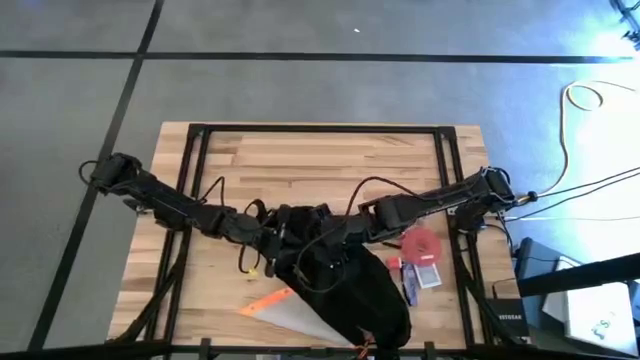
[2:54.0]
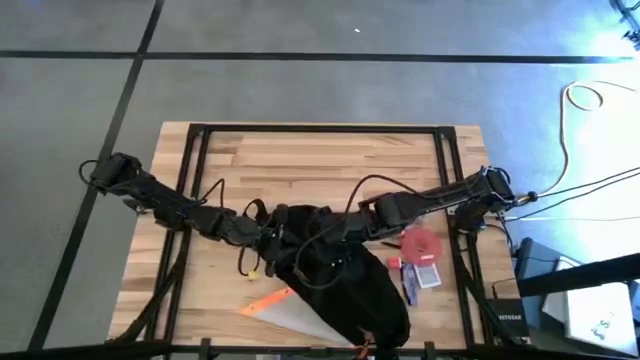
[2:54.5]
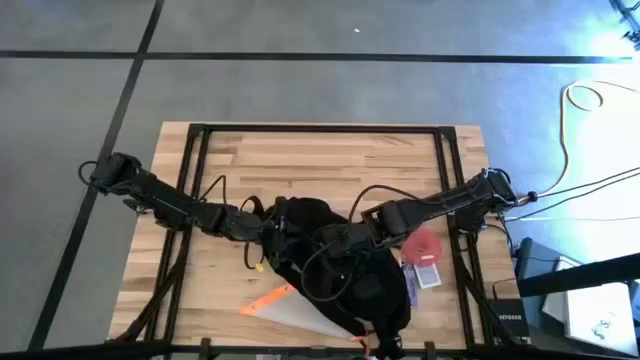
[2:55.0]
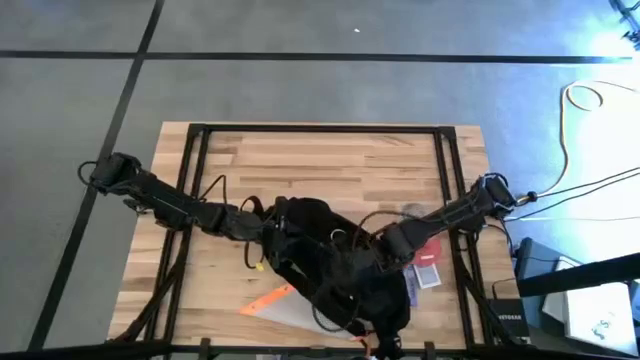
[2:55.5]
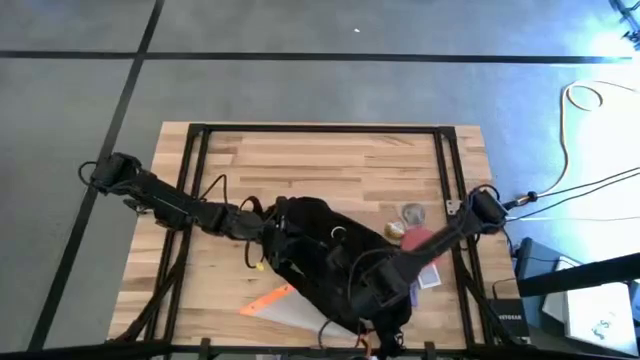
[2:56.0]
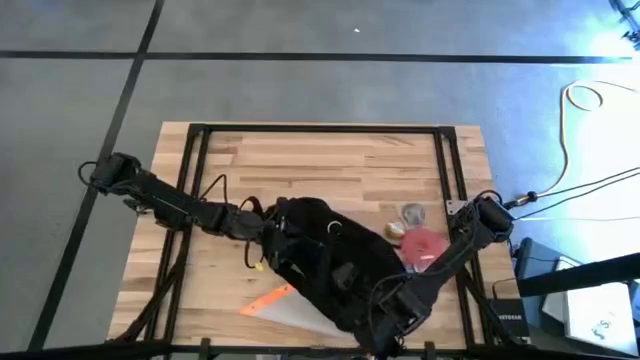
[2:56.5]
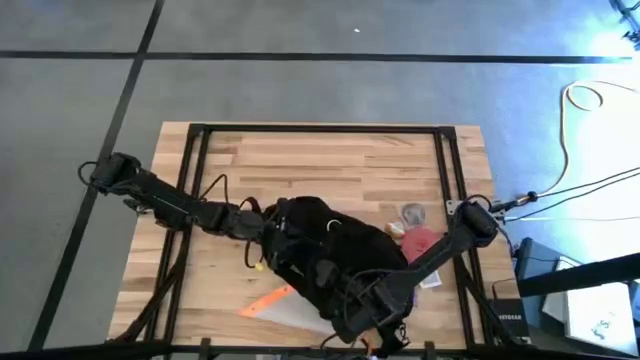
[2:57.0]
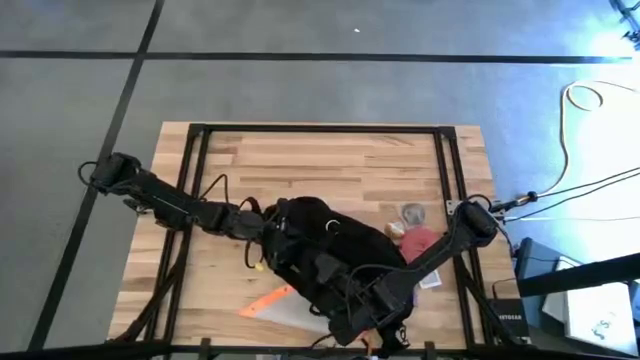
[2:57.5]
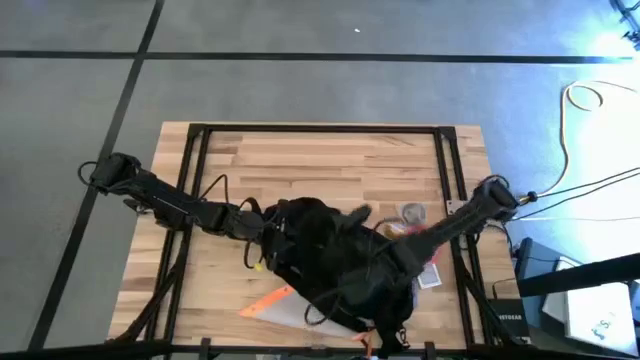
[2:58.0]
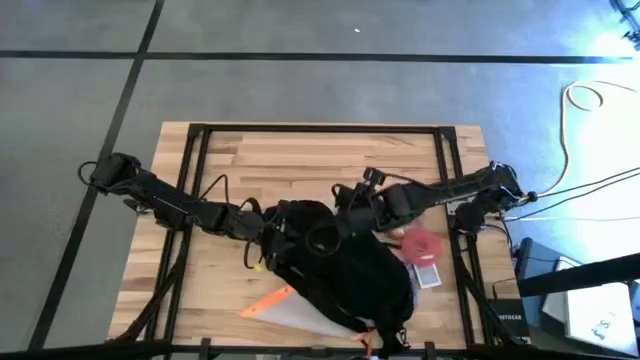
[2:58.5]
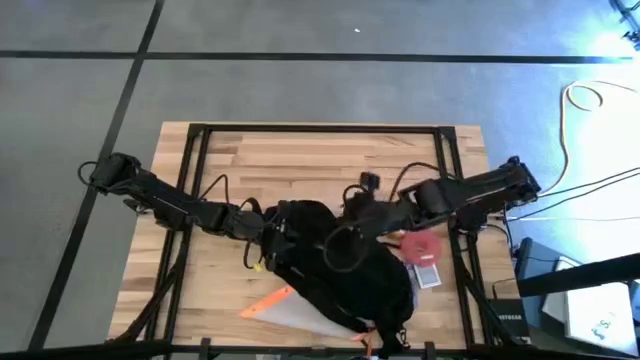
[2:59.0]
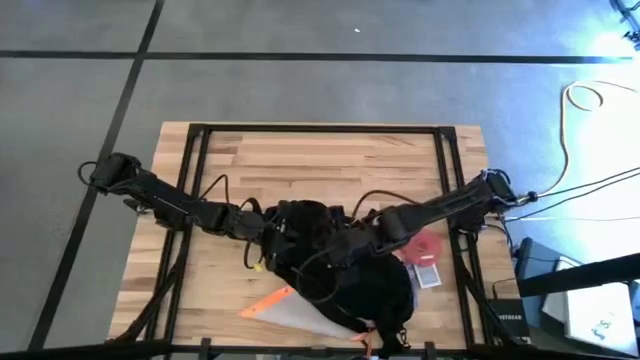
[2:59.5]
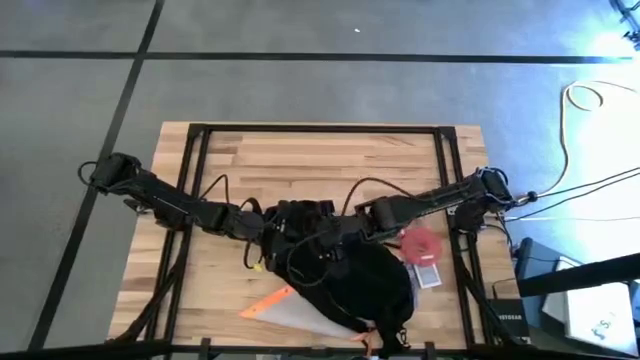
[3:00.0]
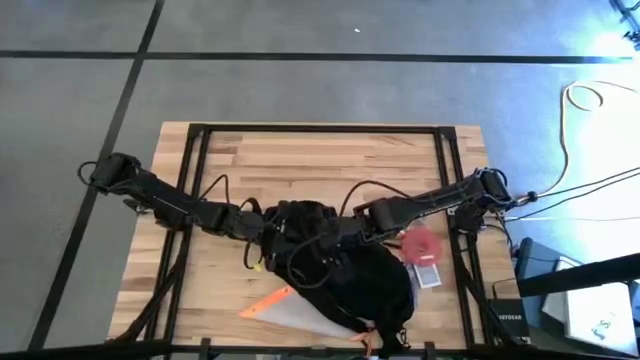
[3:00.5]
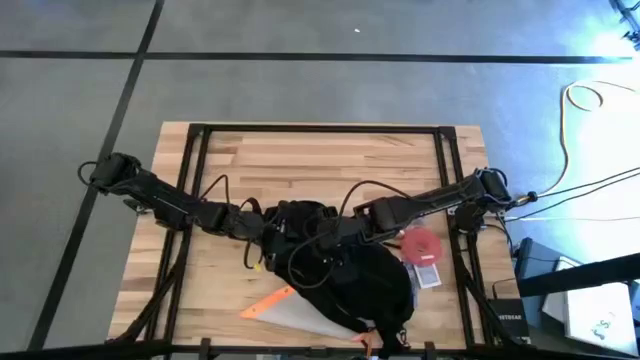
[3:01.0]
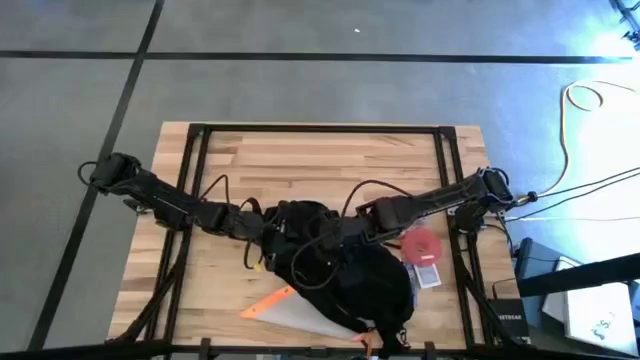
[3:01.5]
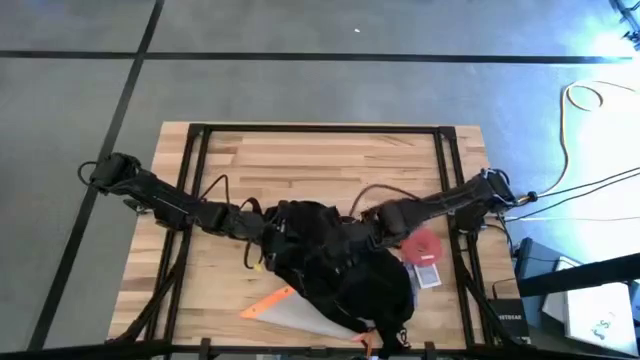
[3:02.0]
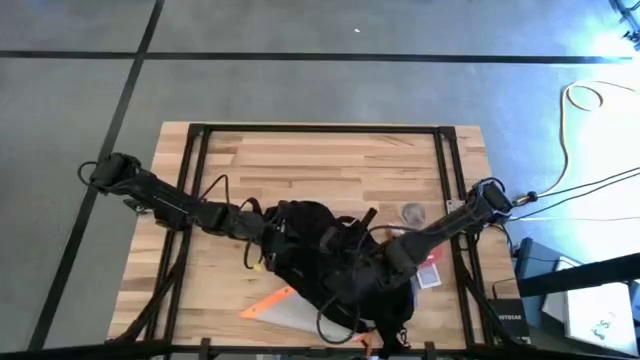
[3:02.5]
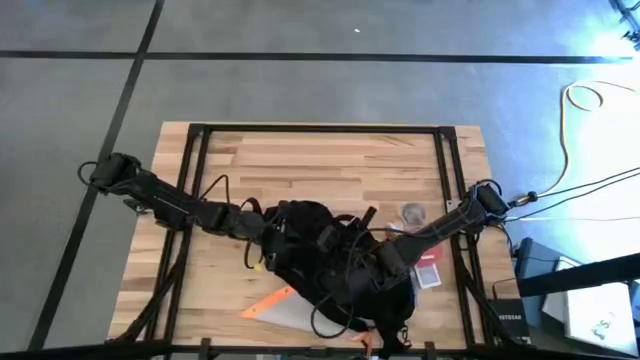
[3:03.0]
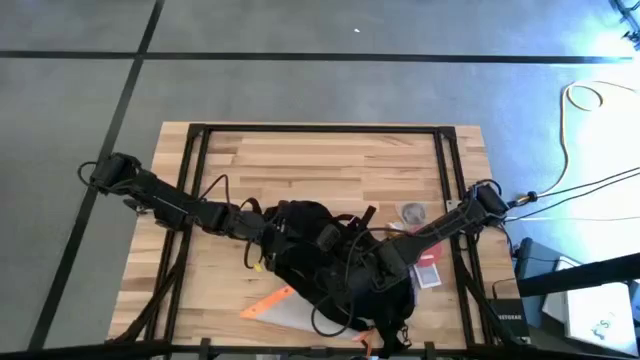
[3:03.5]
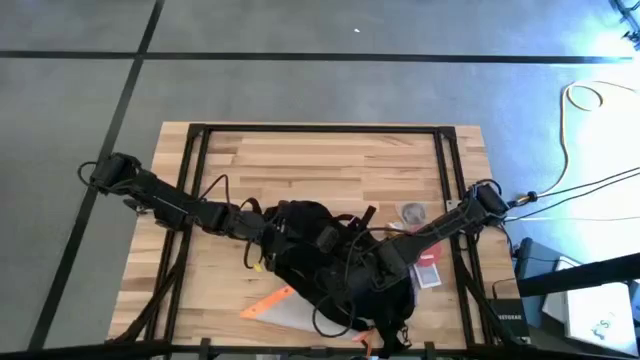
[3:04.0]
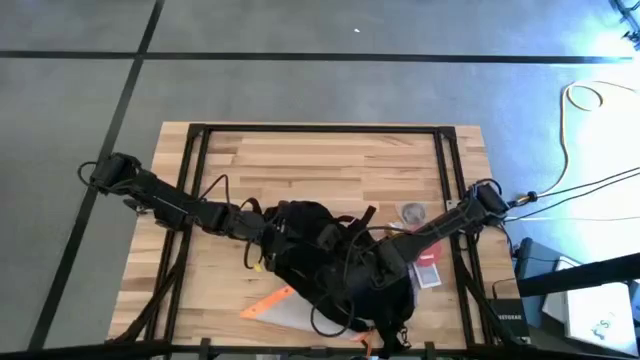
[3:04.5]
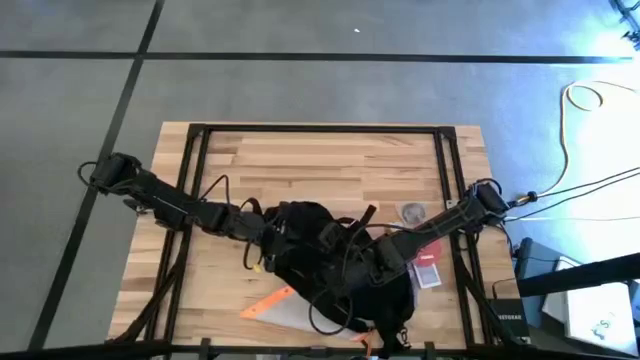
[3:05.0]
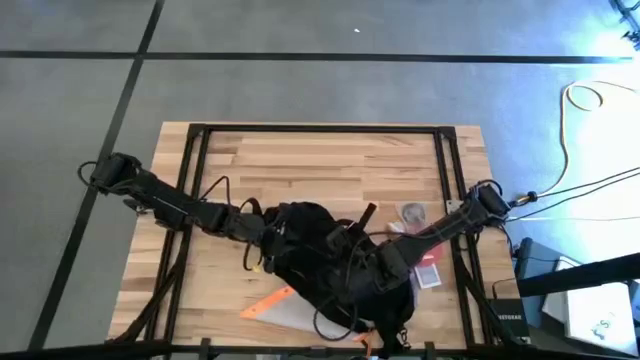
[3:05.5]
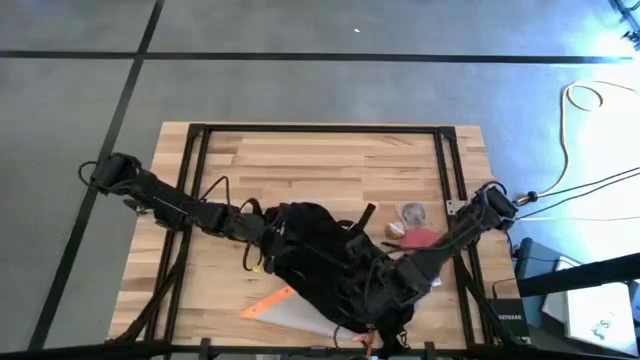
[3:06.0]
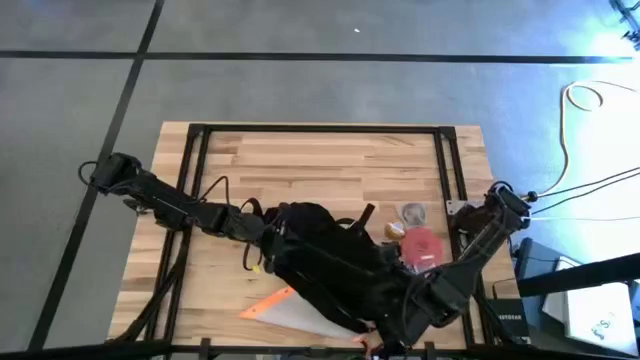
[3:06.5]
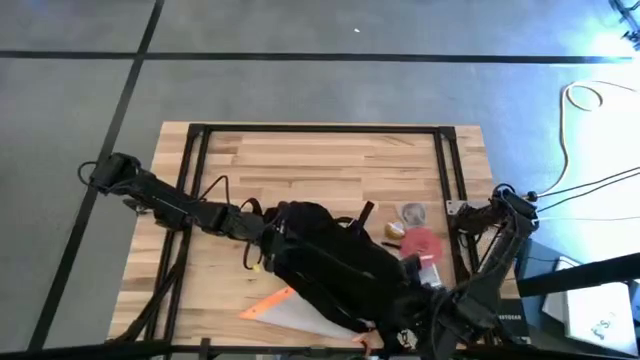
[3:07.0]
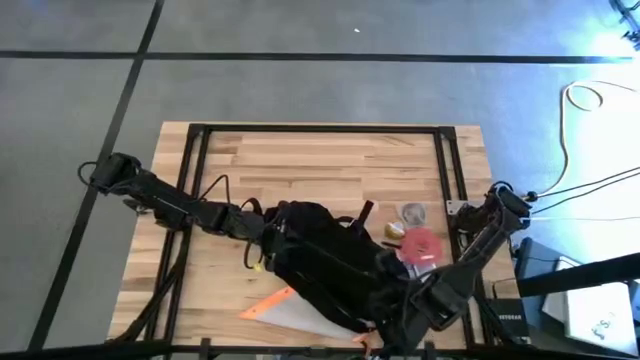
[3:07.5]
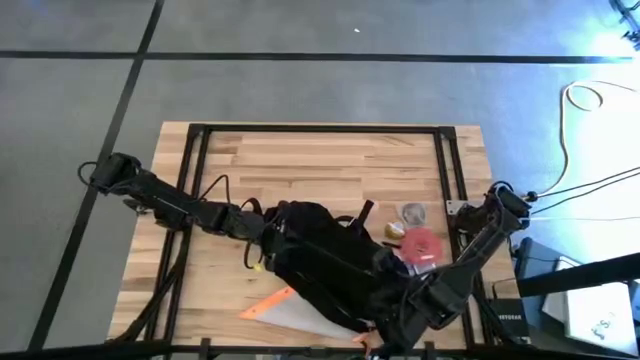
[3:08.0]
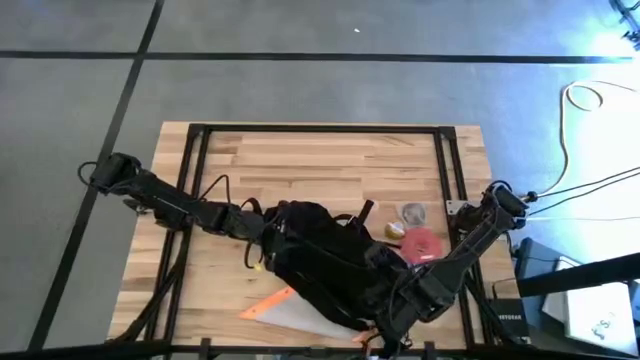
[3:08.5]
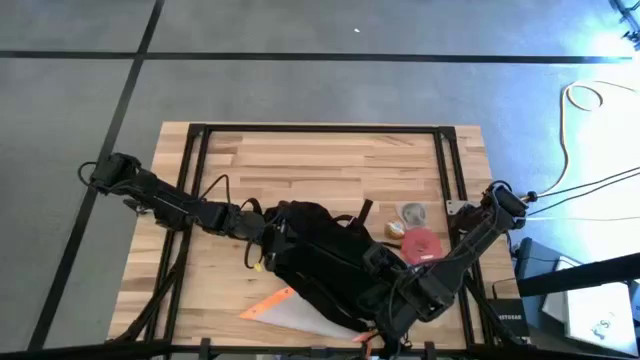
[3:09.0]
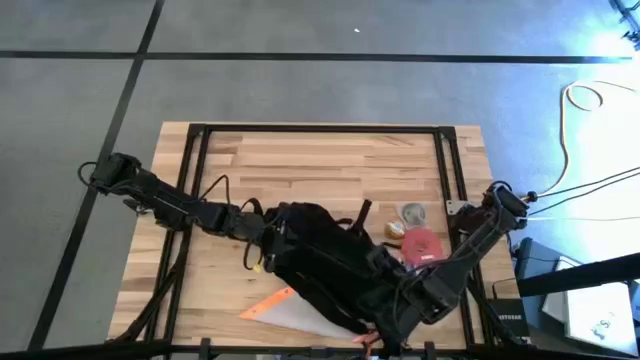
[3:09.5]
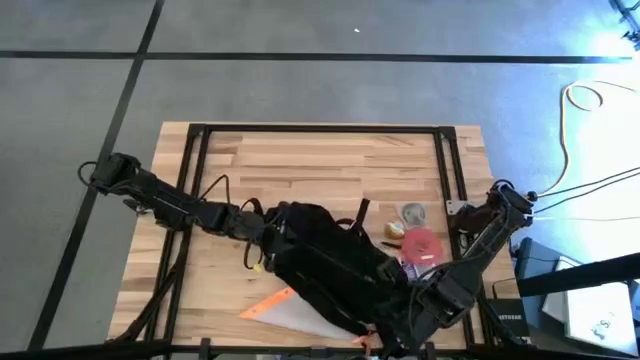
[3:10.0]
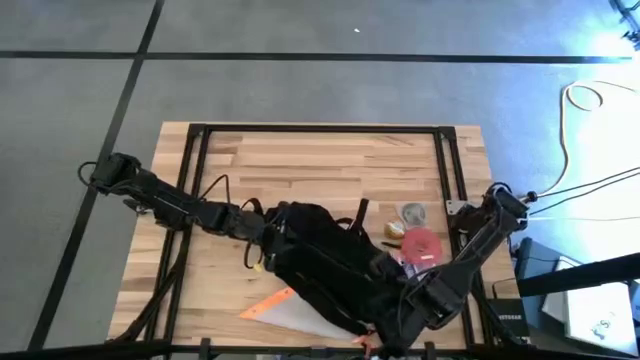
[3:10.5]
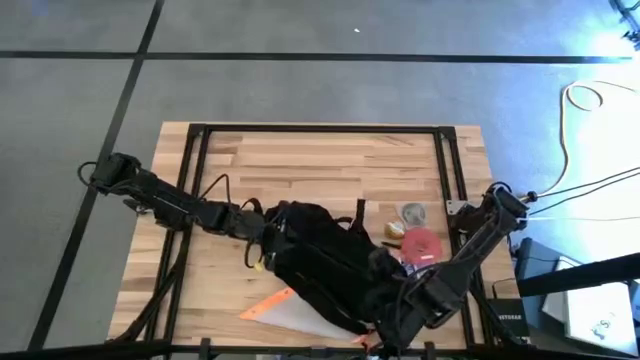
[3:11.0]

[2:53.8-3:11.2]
Task: Unpack backpack
Open the black bag

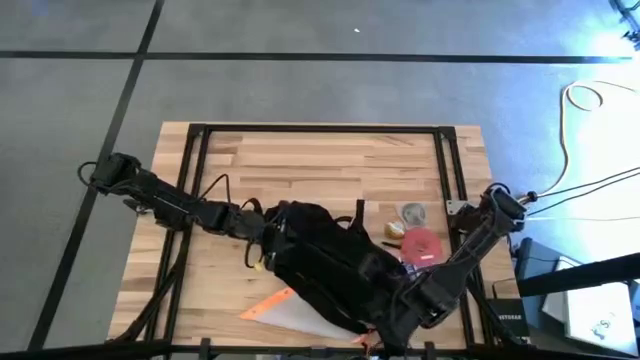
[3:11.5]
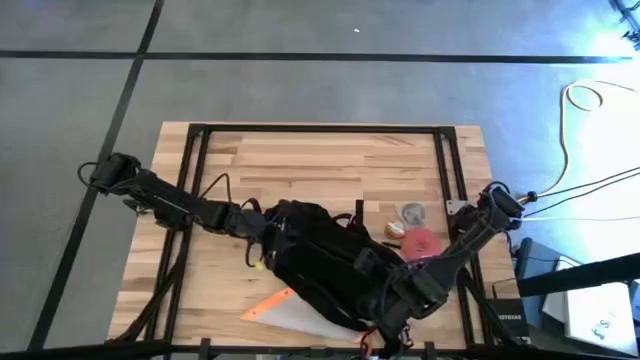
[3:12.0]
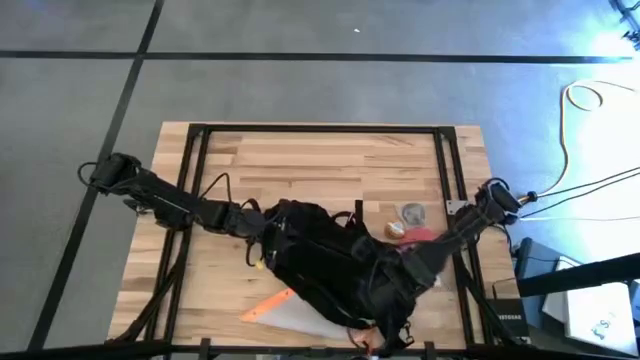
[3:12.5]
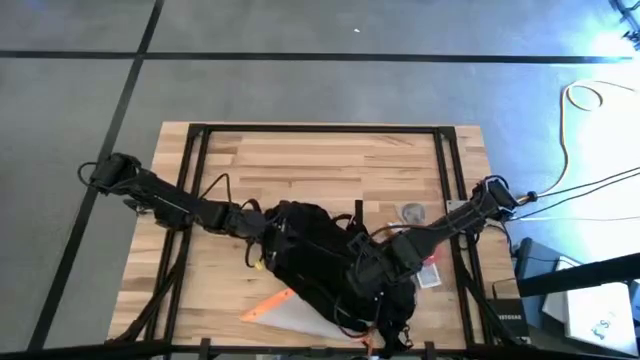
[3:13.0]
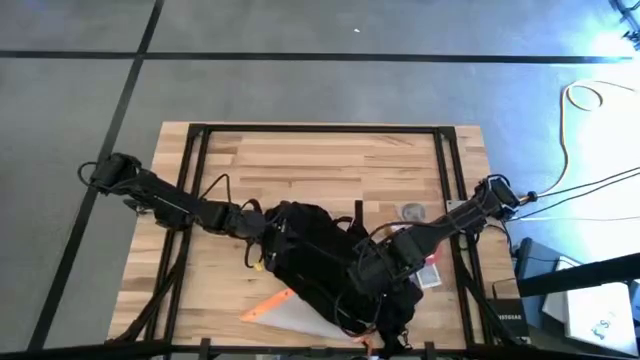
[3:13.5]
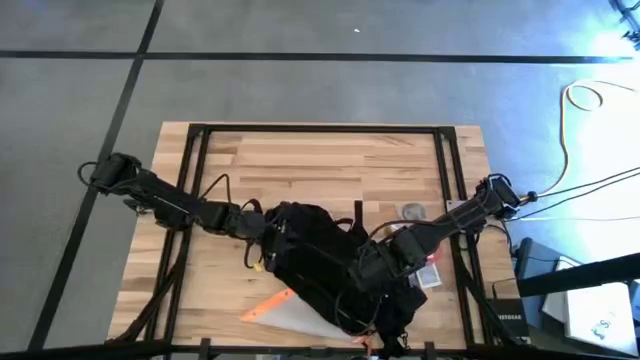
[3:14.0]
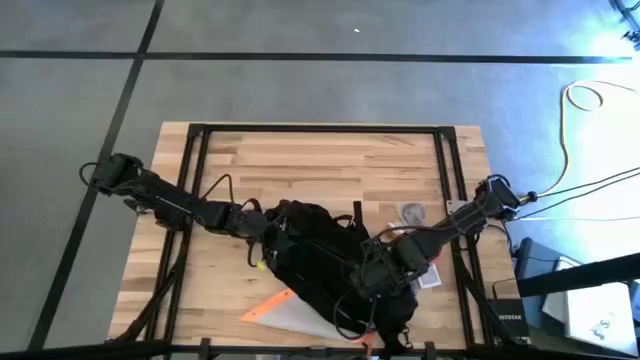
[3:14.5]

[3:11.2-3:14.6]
Open the black bag
